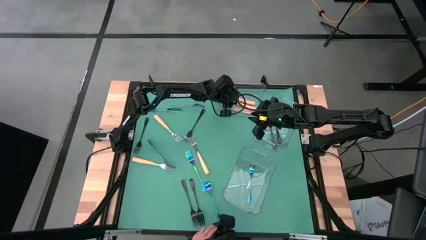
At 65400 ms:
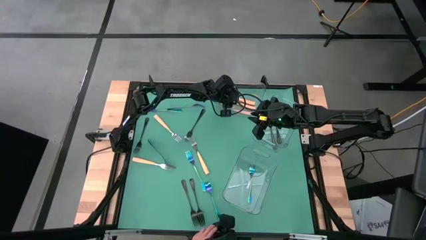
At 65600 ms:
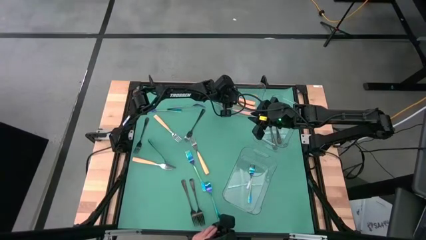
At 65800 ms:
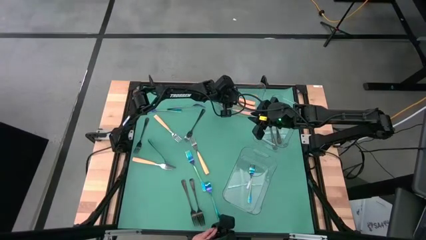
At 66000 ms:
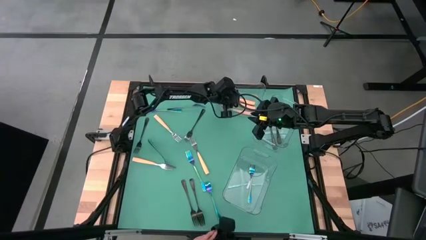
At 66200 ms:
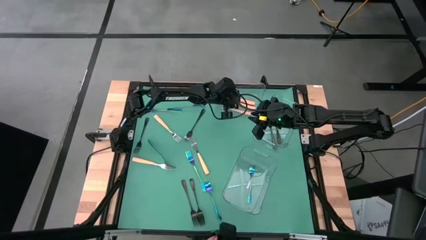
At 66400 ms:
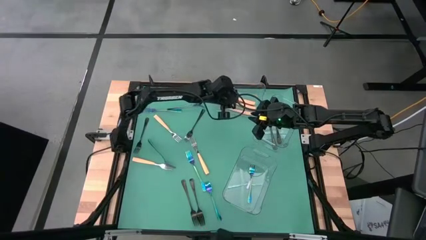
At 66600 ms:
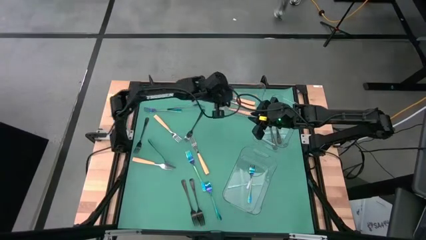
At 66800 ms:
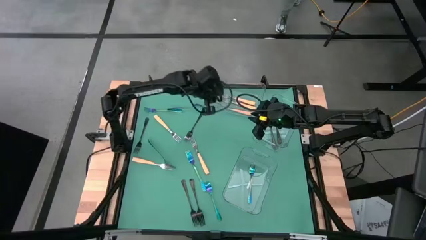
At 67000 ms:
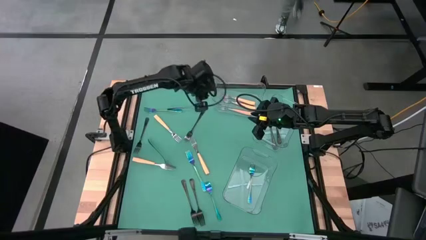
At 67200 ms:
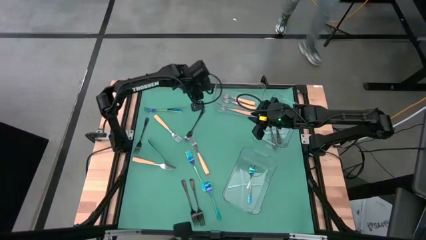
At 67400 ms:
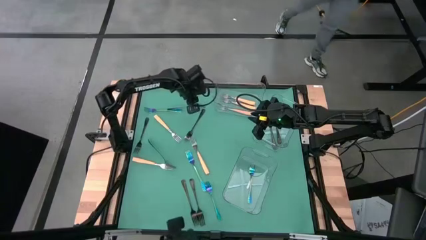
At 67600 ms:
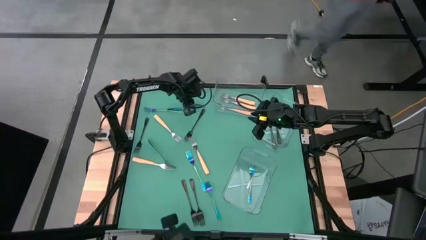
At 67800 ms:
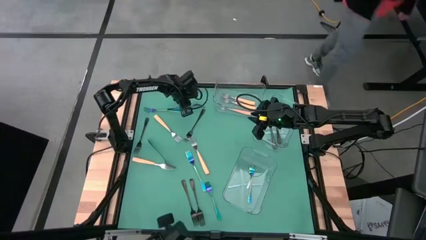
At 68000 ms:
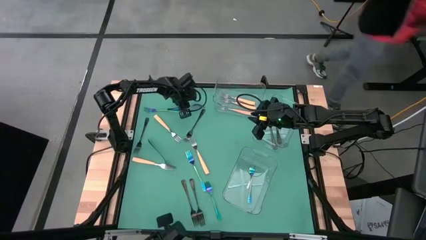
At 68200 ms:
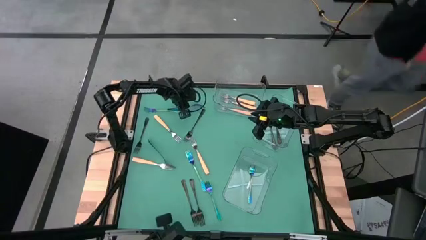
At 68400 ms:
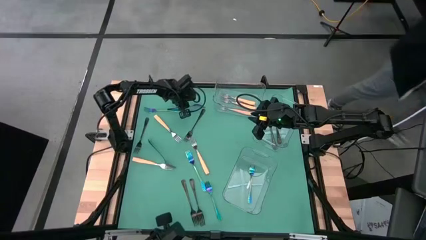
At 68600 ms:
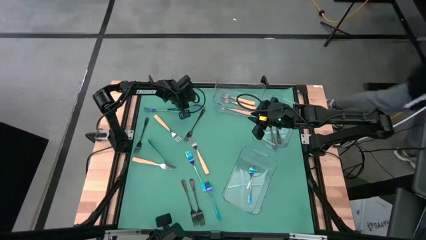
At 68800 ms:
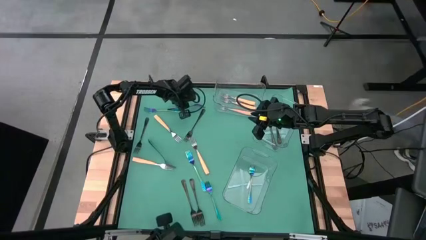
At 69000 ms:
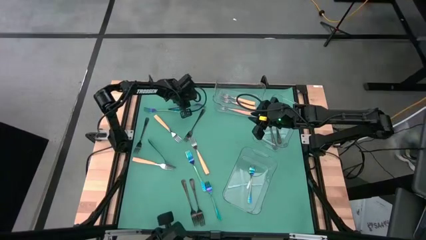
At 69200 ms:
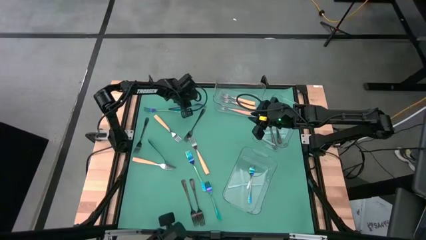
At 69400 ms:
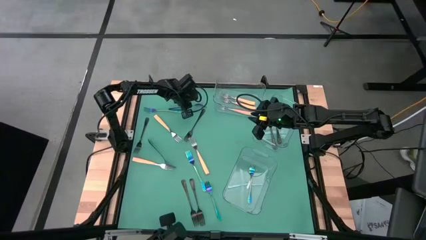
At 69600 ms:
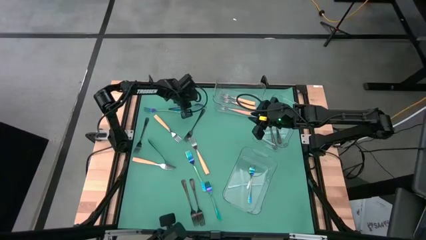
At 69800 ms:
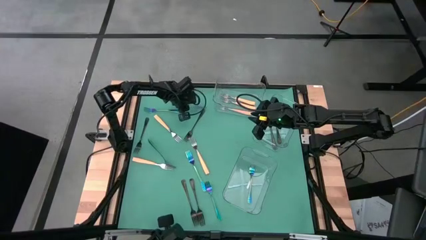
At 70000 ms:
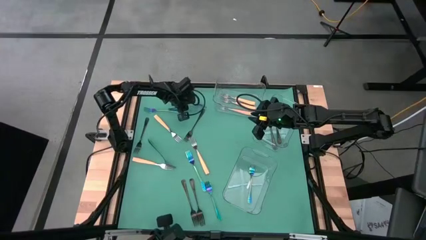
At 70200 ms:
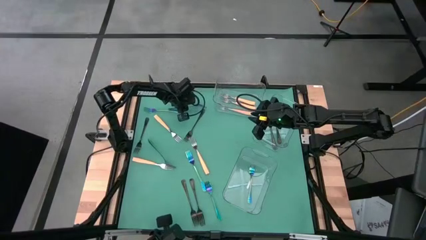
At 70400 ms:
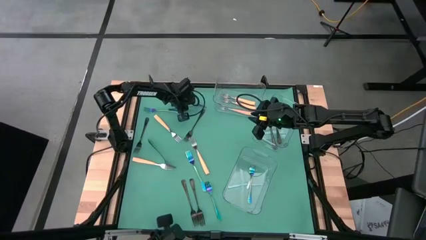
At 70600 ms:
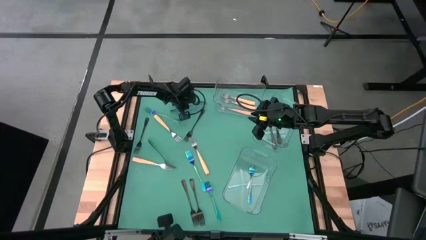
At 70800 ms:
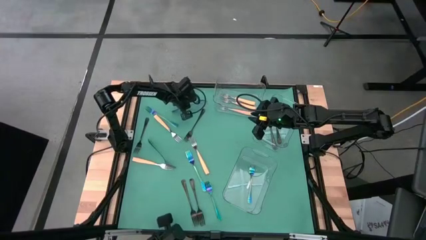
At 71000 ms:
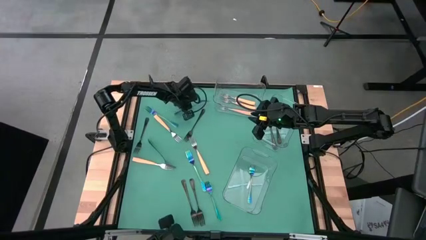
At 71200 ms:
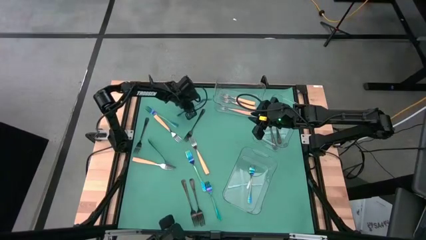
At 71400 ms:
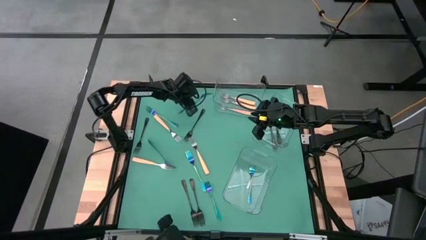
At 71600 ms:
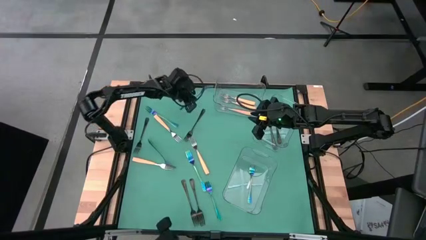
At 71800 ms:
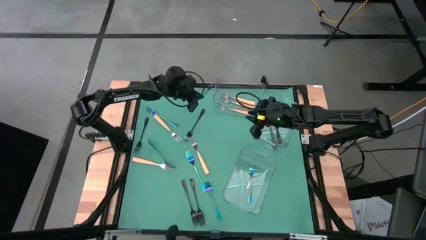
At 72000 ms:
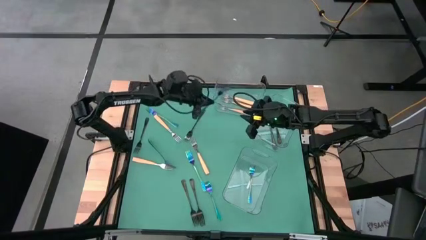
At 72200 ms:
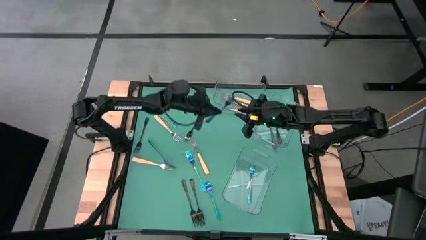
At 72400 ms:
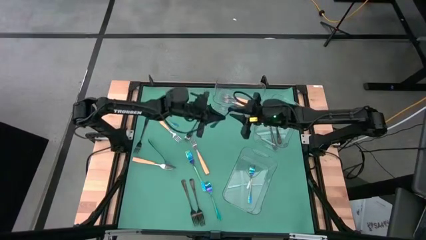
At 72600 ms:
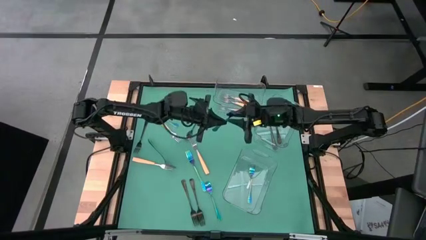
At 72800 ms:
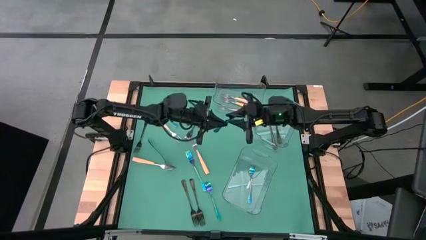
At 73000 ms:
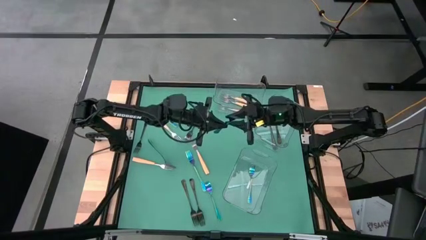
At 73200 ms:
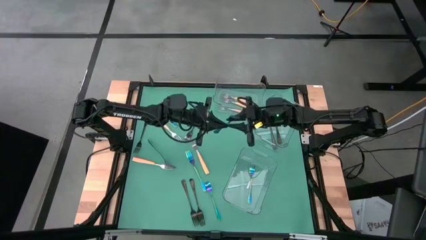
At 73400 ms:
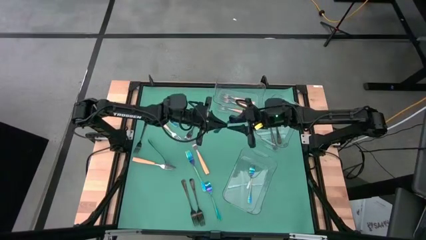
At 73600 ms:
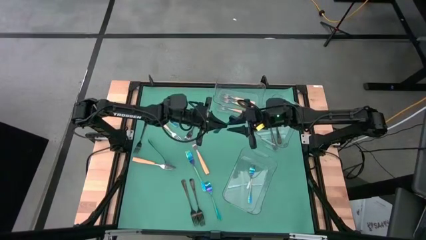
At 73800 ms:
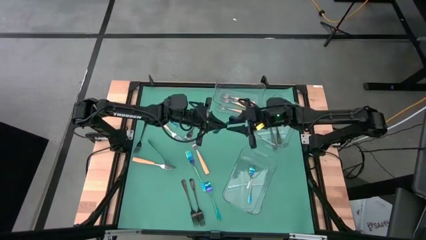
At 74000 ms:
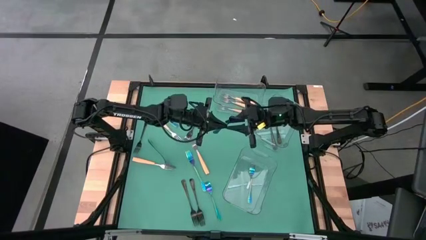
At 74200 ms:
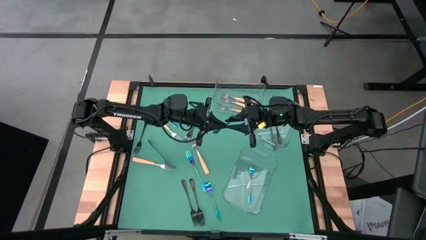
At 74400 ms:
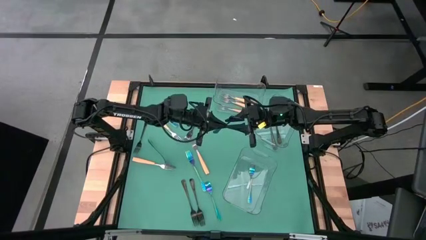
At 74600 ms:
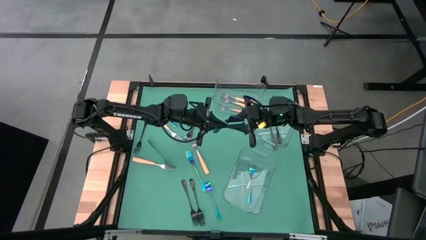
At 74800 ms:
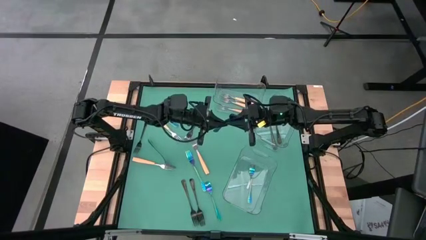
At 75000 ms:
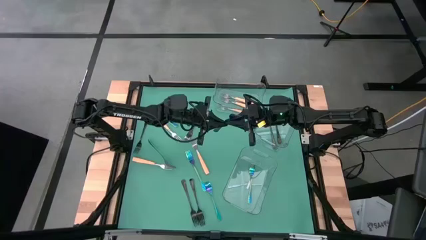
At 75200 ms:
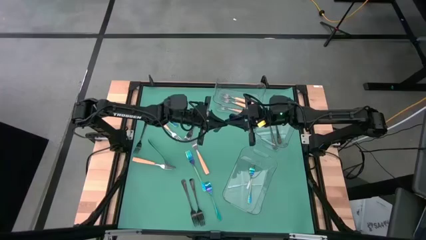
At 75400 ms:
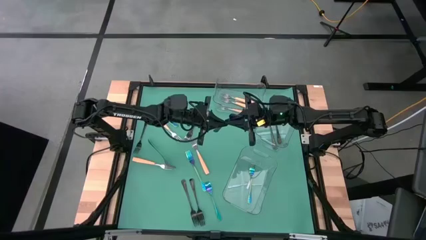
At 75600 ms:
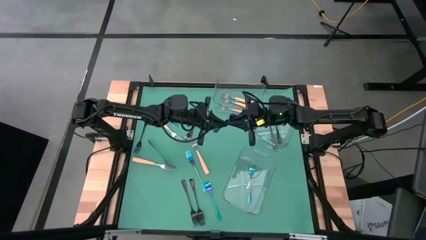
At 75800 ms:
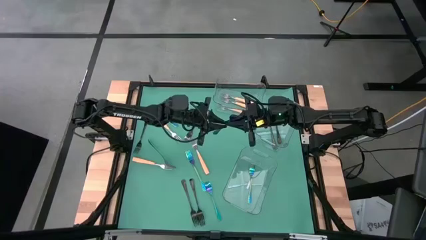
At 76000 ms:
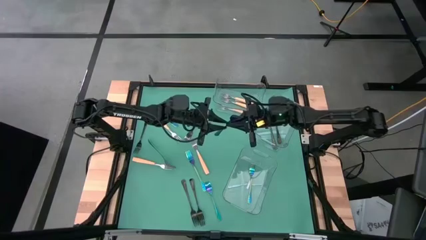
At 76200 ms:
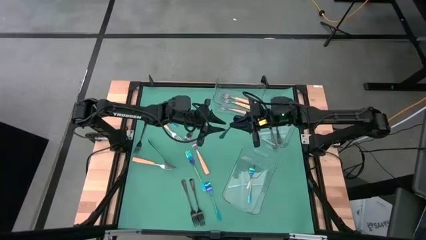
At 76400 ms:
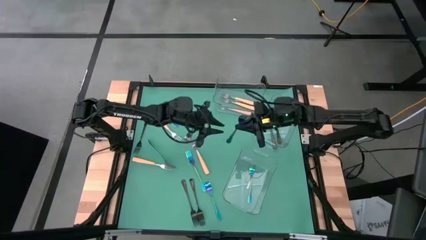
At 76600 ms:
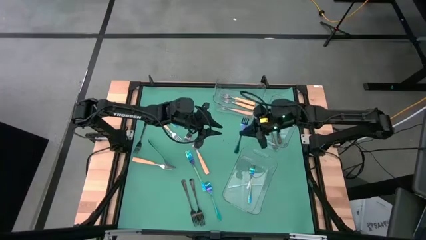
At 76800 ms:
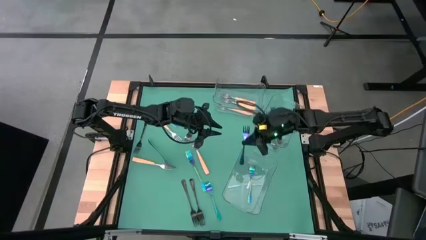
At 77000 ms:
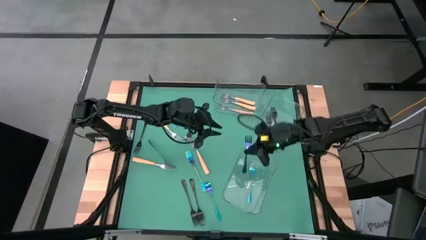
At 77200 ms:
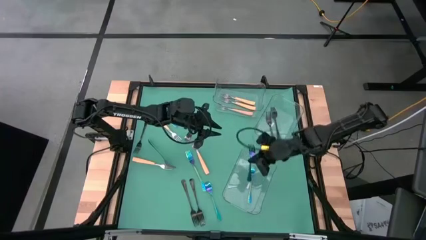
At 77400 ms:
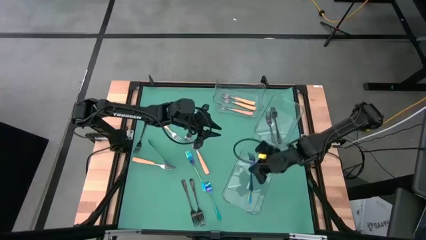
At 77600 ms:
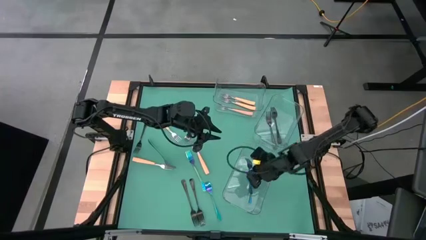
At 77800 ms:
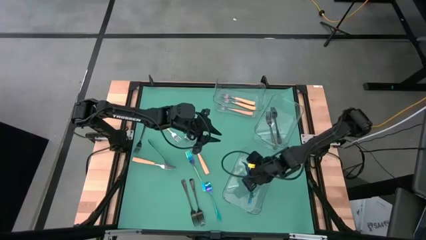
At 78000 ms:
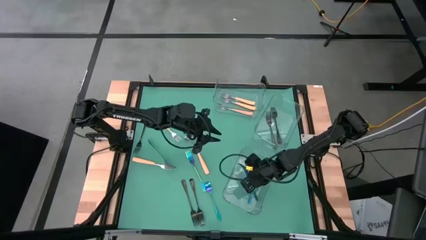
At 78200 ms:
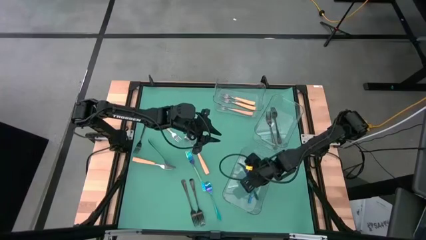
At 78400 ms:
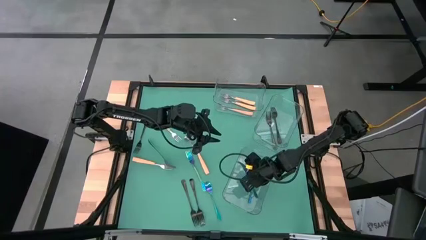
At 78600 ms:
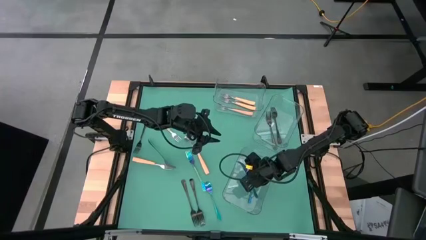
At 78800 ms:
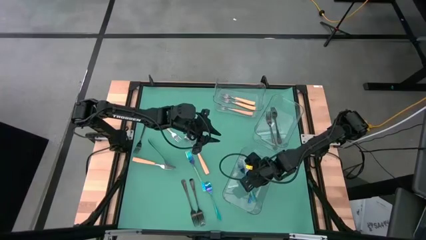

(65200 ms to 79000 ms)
Task: Sort silverware by color (type)
Put the blue fork into the bottom transparent bin

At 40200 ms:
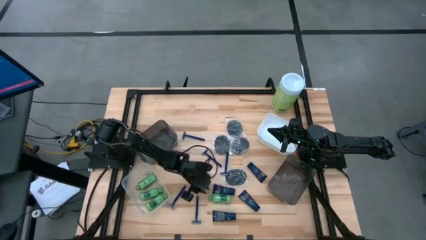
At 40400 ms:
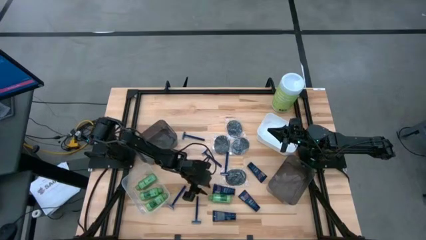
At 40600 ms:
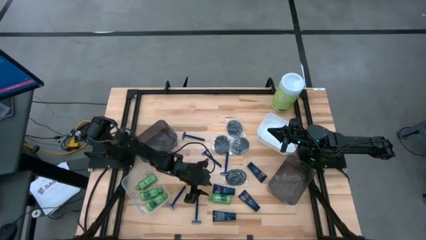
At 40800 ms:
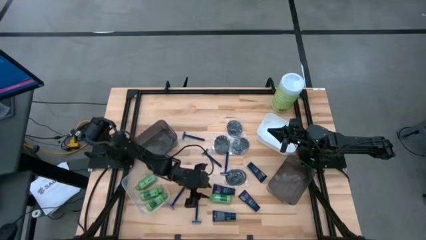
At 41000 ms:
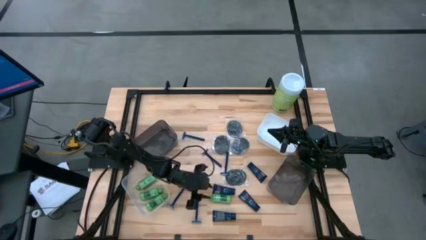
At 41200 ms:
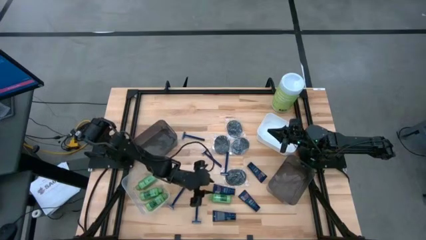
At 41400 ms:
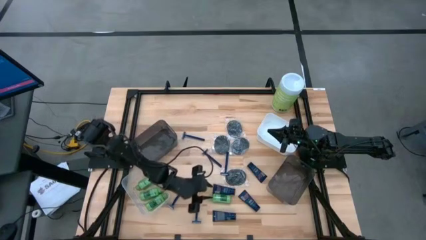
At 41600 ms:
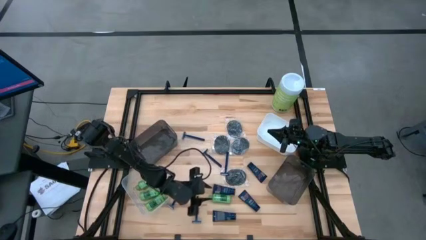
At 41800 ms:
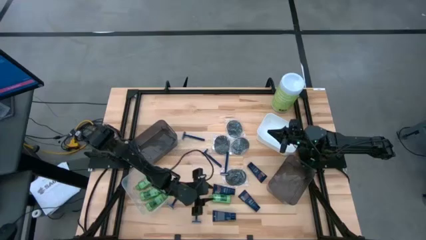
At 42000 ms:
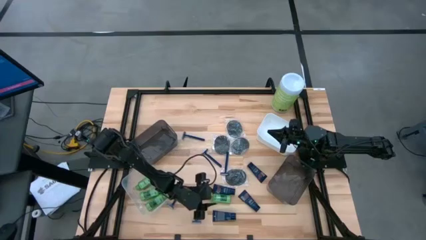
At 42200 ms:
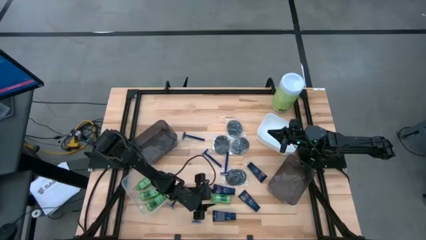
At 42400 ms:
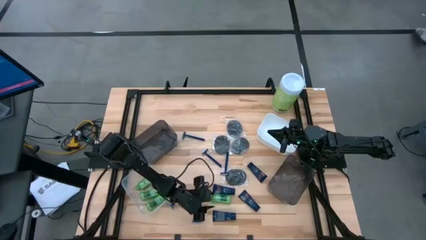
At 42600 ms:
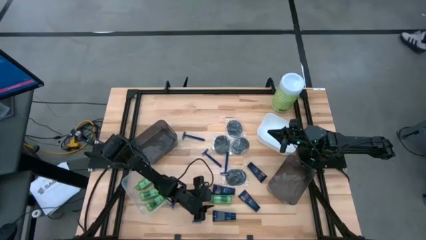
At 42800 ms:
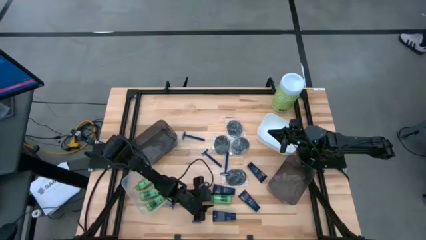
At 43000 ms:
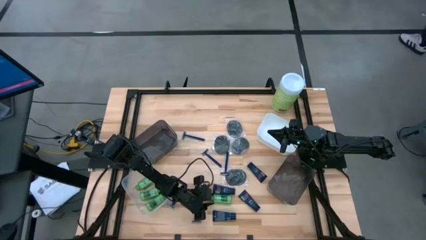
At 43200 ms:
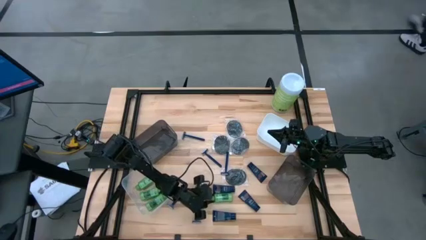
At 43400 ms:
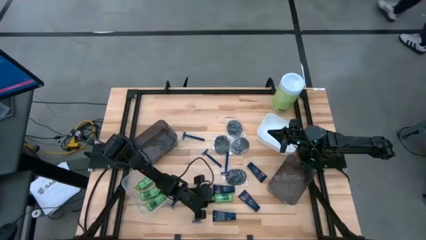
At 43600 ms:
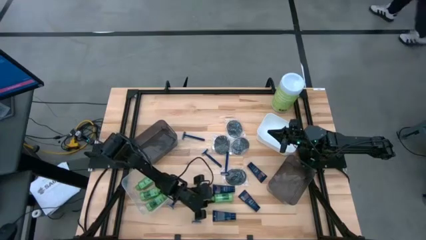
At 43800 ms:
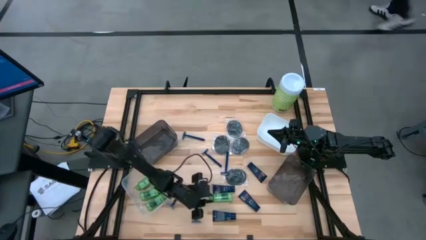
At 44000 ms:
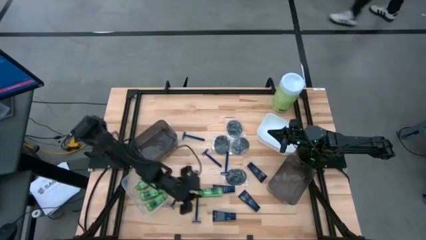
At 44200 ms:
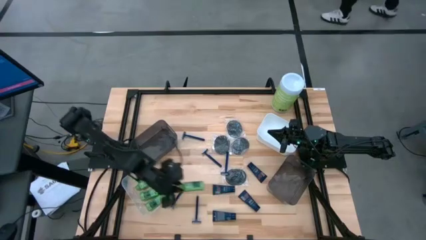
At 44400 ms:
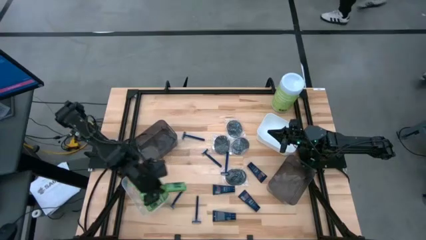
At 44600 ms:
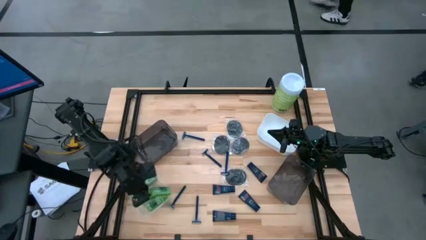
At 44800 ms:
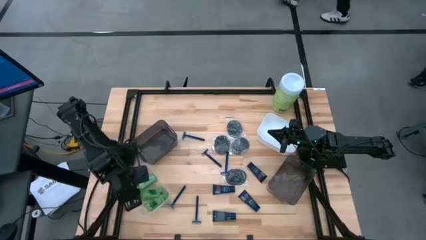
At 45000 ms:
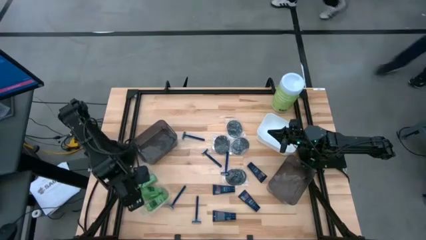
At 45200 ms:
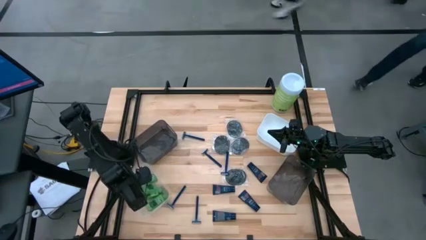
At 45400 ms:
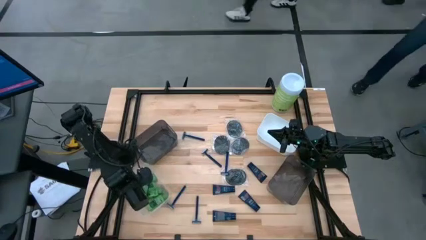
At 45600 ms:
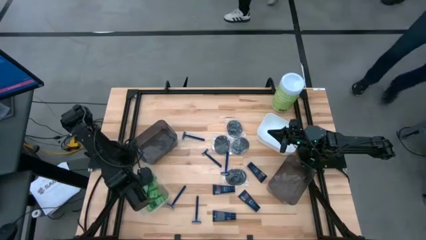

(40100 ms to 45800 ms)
Task: Pick & Place Travel size toiletries
Put the green shampoo into the transparent bin
